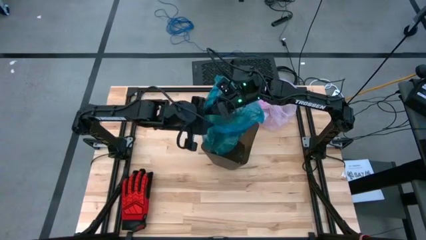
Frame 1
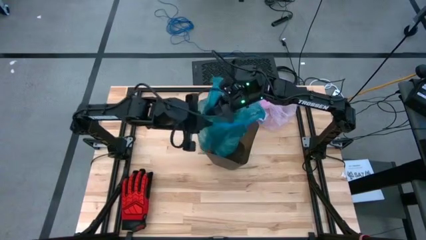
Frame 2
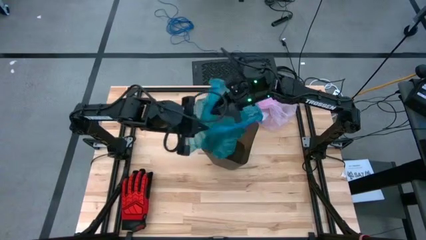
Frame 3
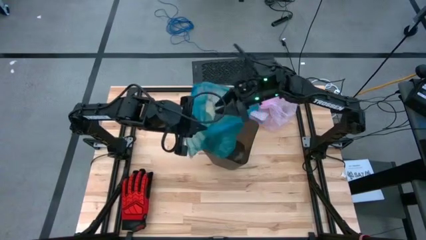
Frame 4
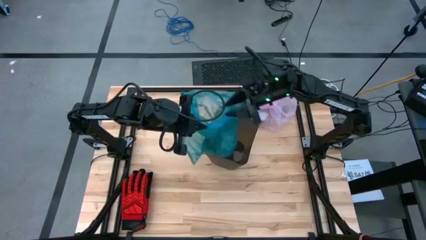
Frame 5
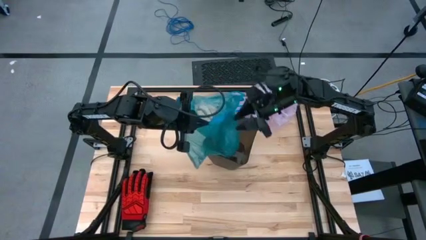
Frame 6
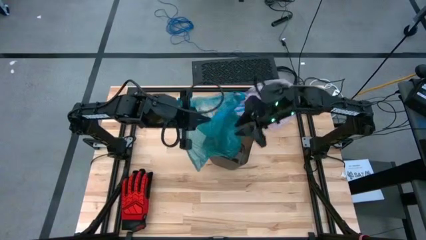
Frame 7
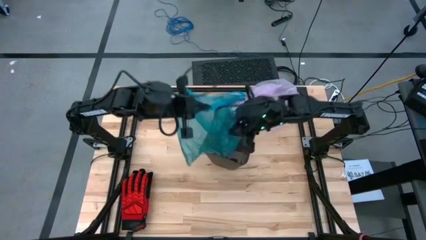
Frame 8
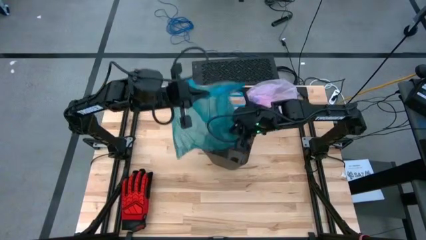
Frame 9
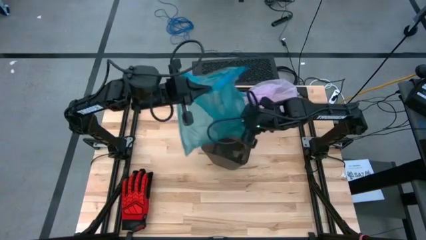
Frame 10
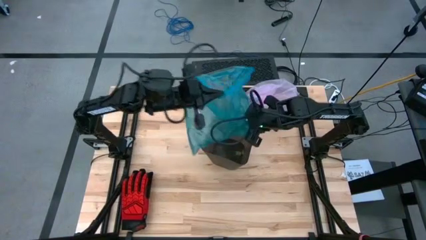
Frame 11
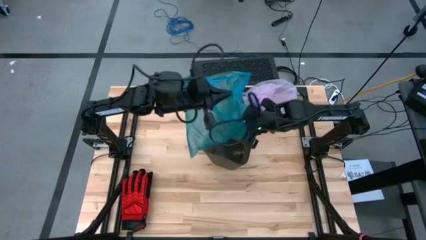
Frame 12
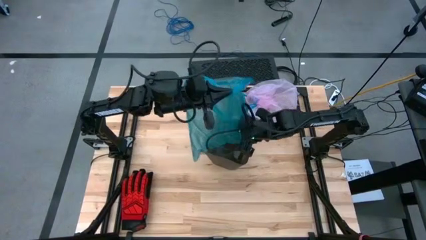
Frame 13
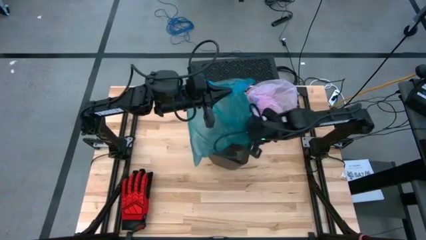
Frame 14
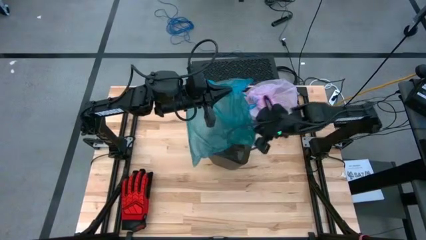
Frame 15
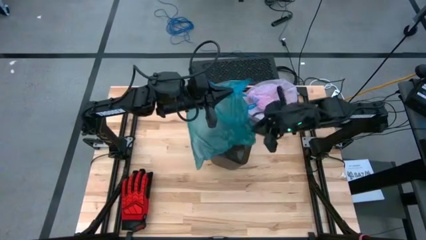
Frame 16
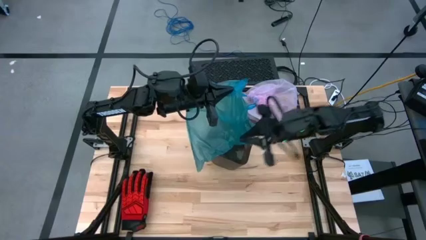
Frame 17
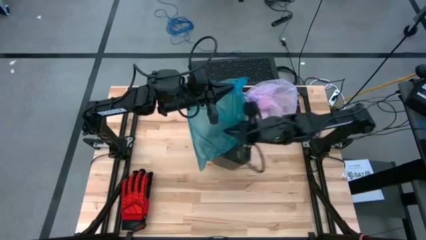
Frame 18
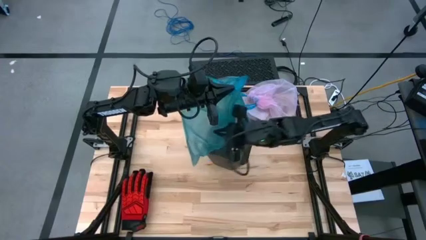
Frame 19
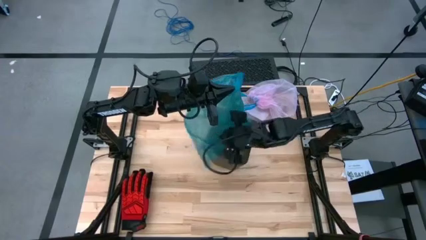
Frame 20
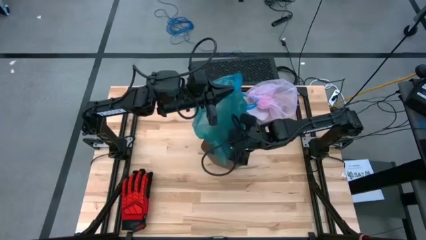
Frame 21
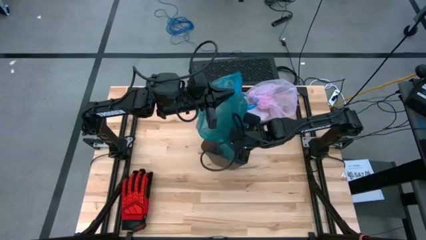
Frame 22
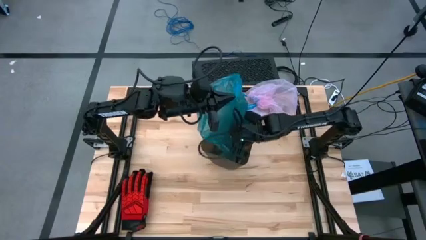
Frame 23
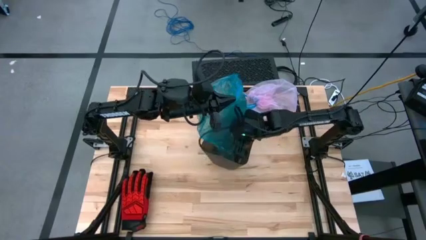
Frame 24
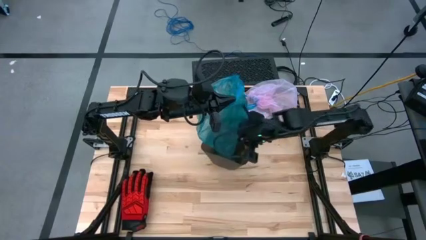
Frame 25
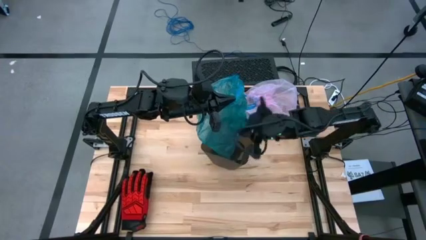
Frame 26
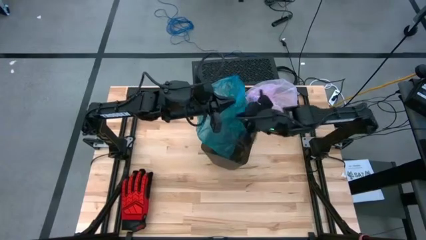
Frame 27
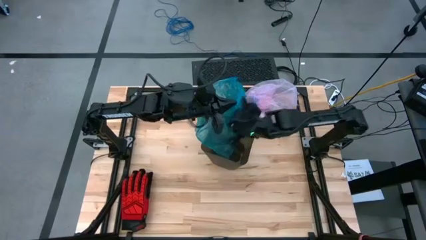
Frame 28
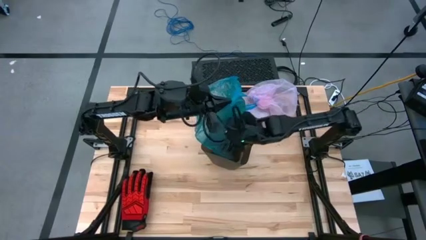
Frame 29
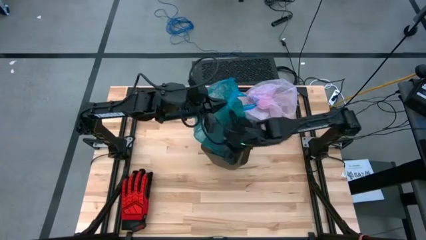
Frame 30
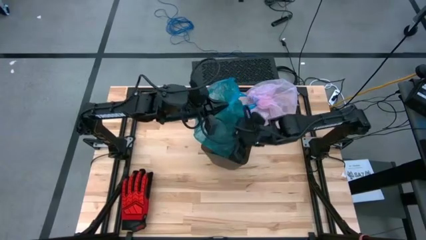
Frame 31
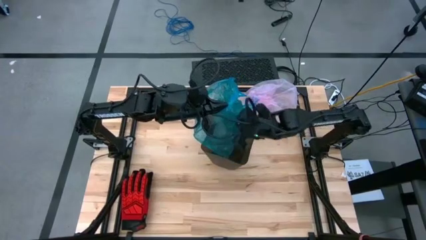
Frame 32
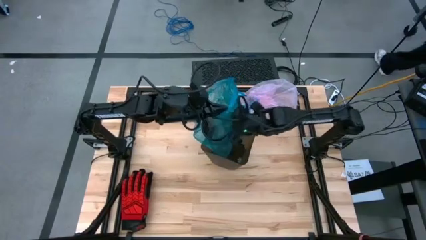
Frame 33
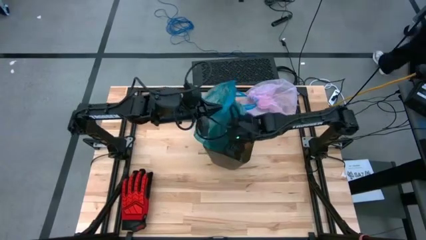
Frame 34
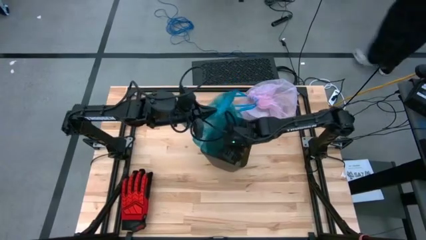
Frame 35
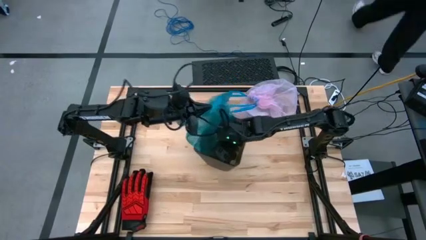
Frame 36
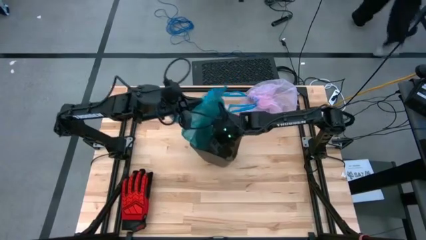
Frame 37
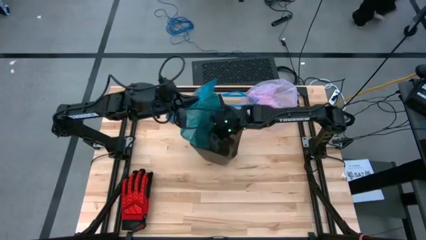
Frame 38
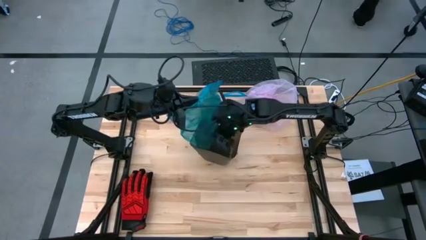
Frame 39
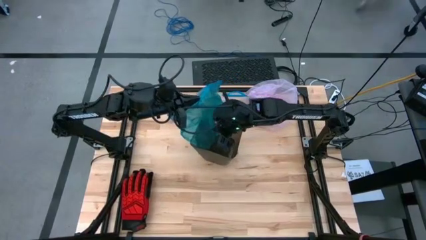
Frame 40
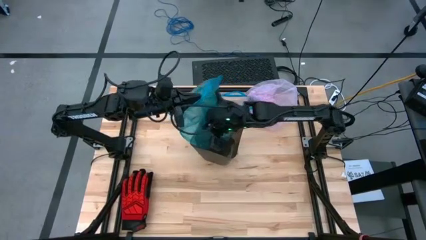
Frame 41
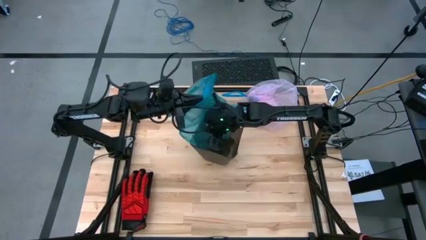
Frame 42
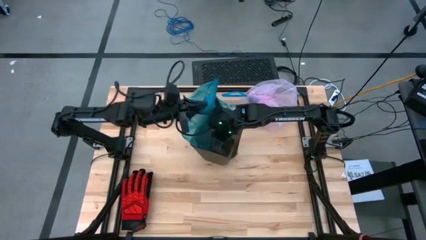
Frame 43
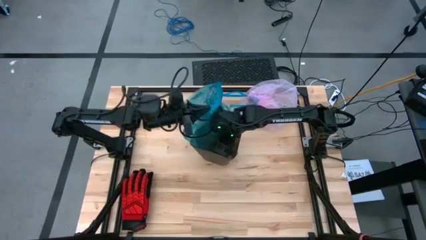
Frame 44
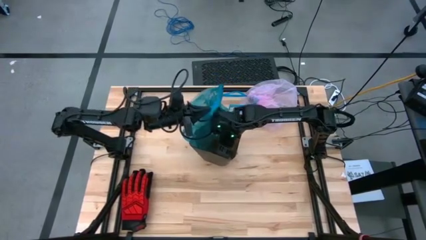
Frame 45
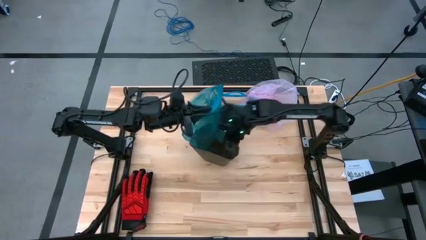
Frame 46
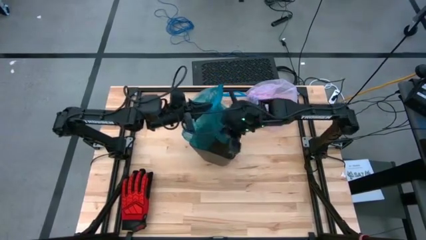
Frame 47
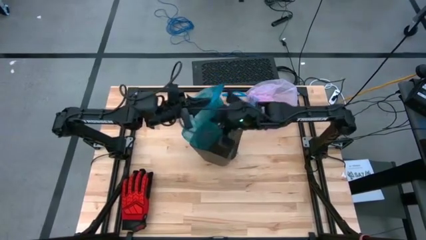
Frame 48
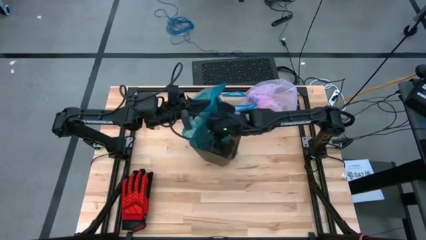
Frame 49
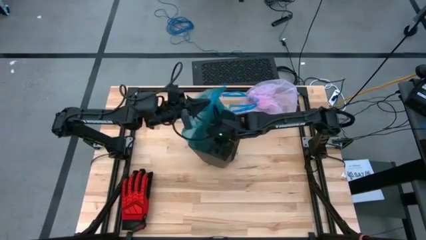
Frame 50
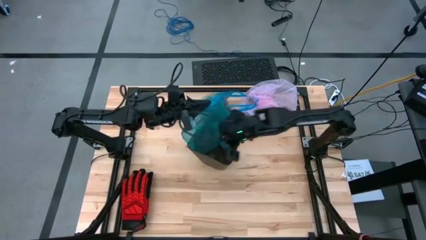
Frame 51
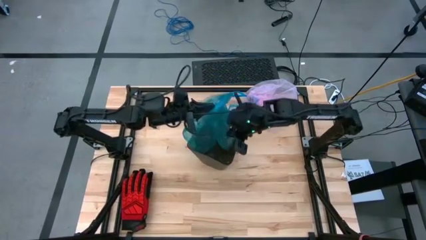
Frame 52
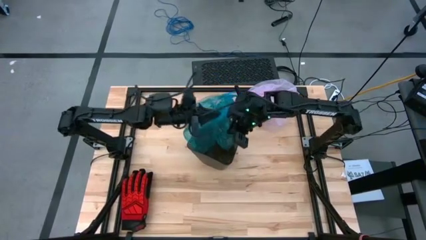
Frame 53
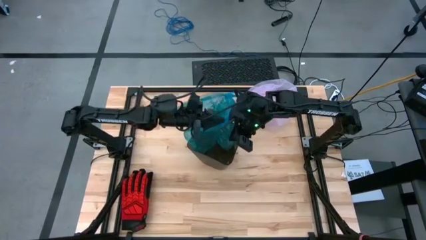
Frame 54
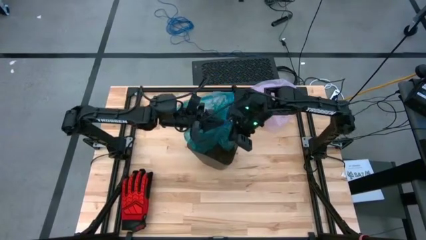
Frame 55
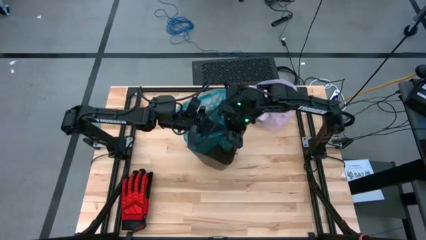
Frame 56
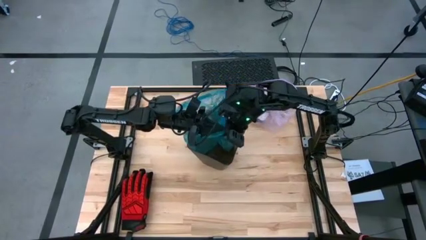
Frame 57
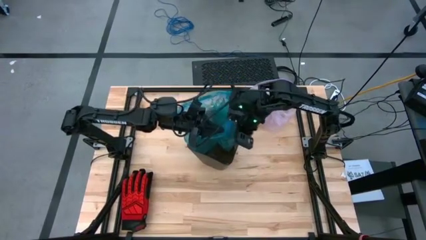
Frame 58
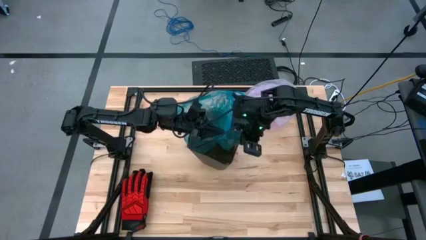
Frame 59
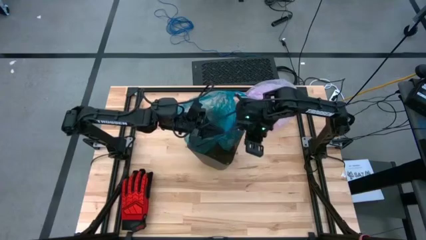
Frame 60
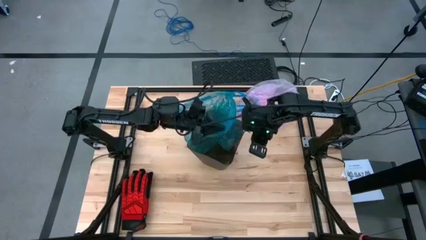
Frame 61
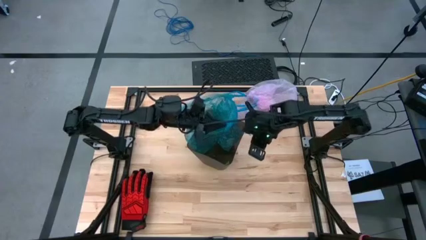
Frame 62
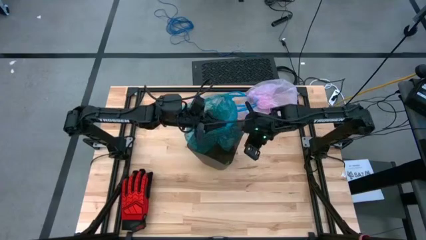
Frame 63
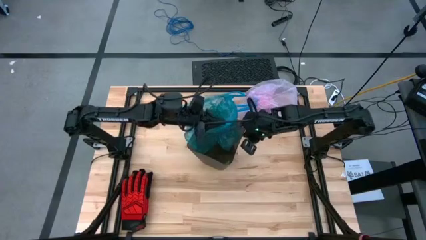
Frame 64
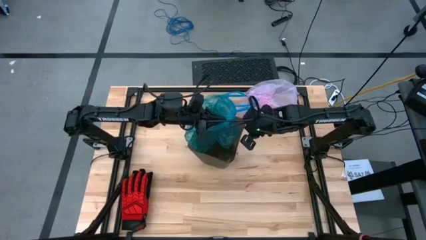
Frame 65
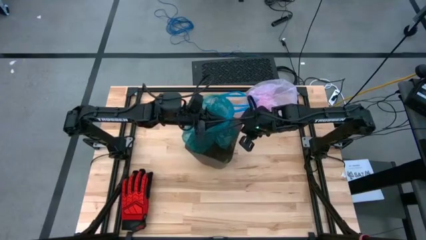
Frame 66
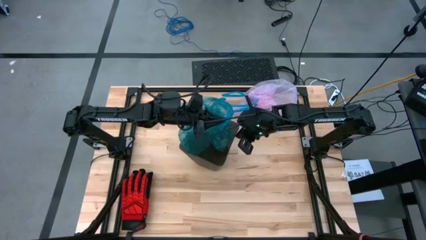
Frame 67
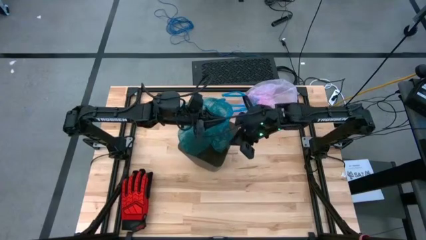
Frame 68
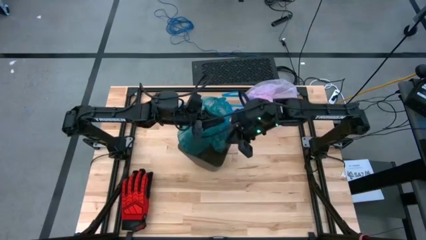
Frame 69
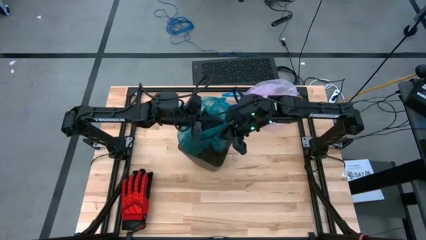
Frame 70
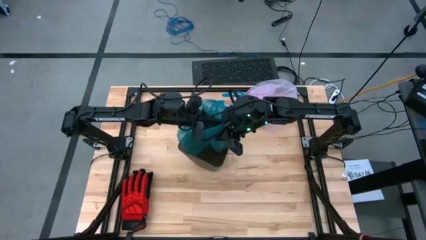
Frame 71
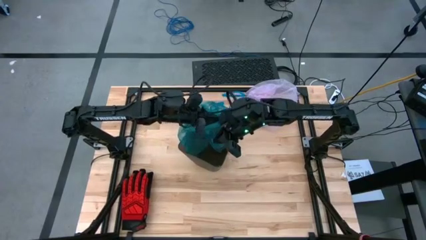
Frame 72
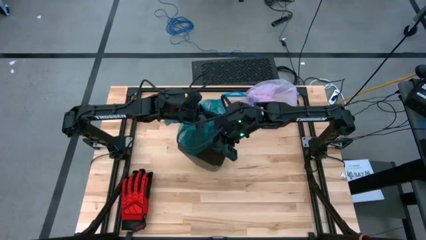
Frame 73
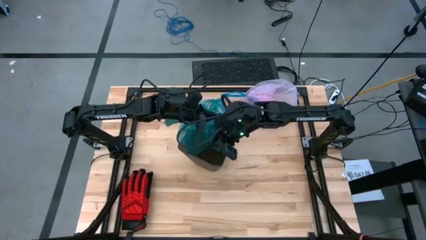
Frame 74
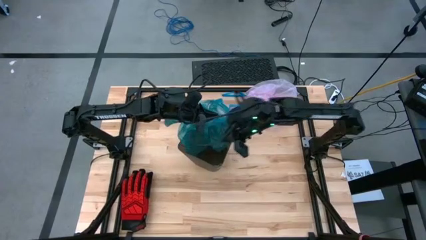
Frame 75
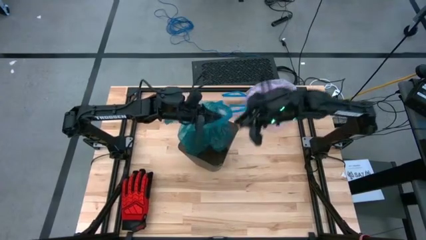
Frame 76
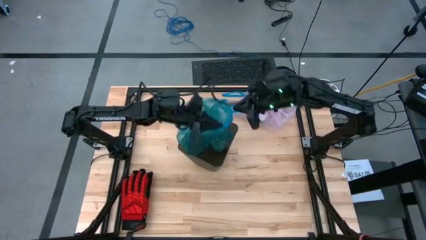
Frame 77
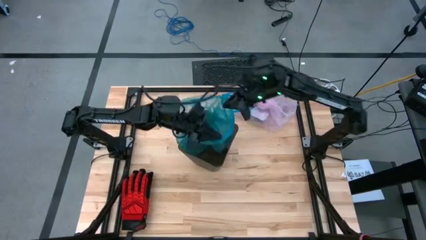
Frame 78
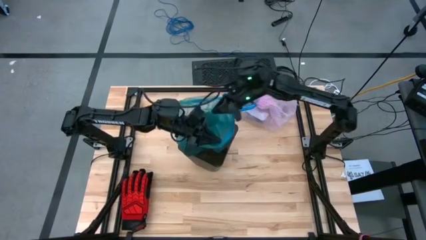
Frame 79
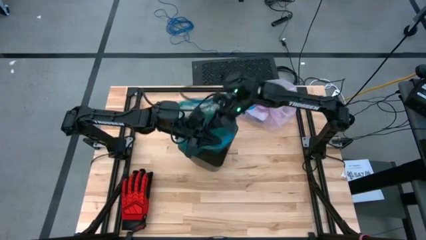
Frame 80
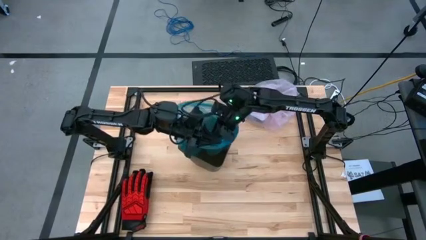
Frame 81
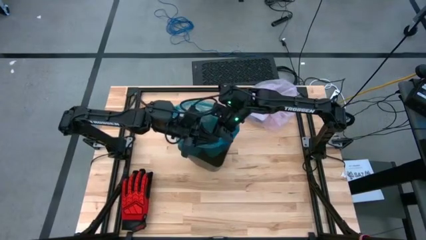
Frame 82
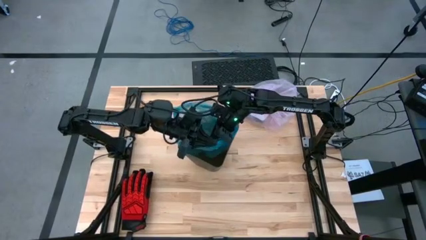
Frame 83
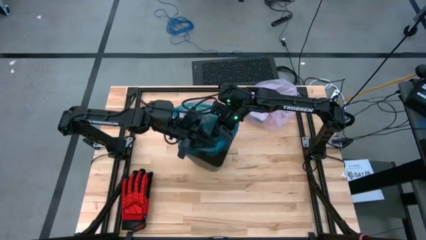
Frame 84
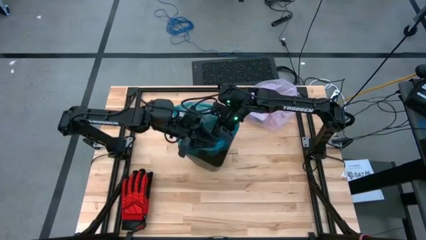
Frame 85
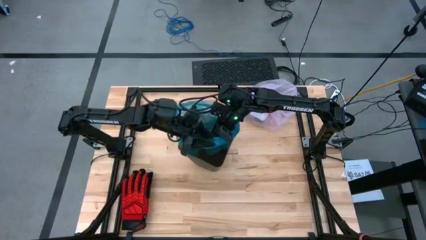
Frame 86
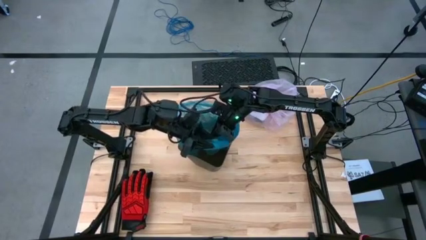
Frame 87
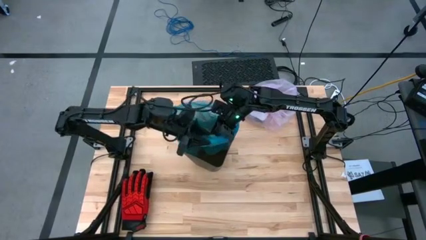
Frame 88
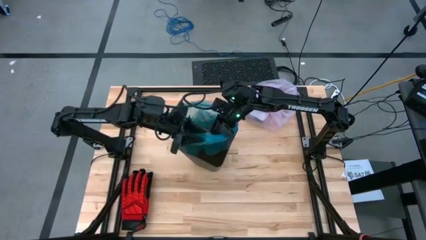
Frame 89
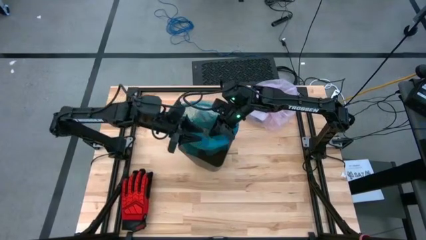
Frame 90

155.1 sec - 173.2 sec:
Task: place trash/remove bag and relplace
Insert the blue trash bag into the trash bin
